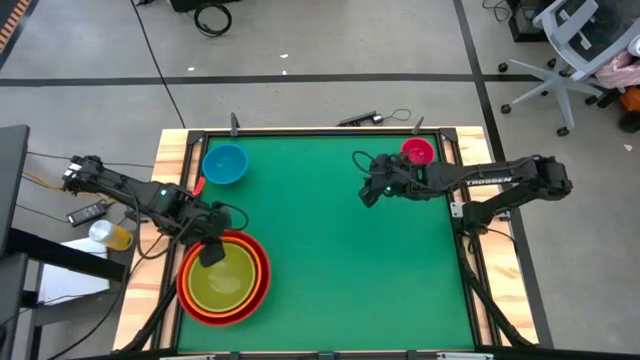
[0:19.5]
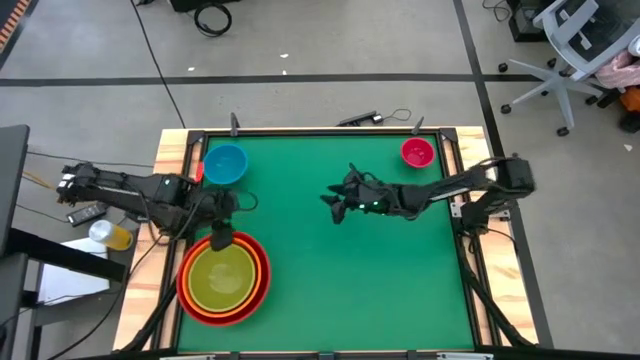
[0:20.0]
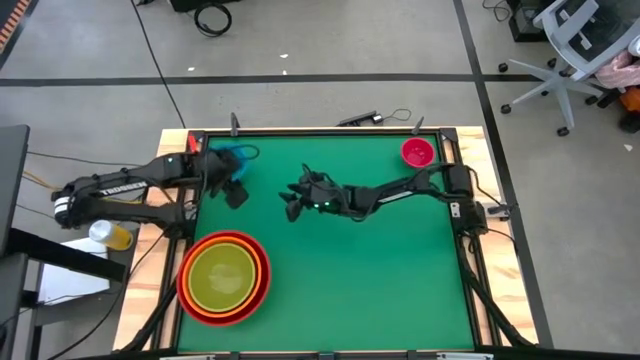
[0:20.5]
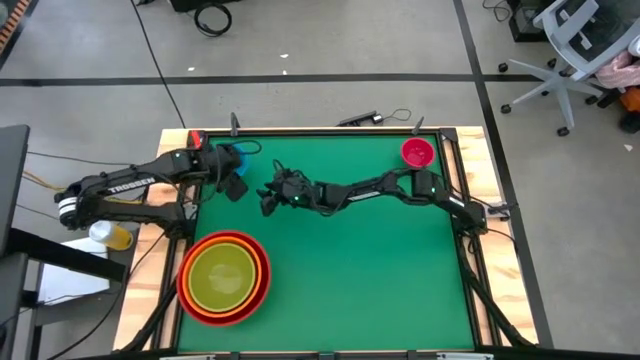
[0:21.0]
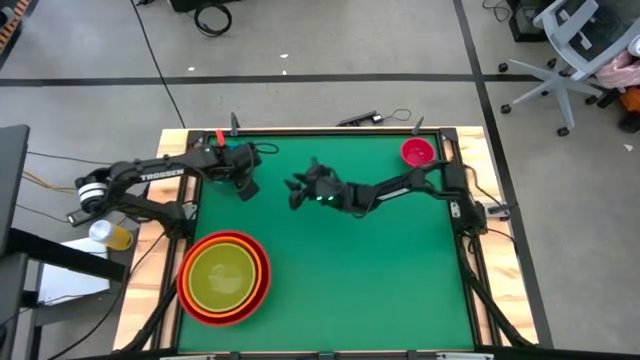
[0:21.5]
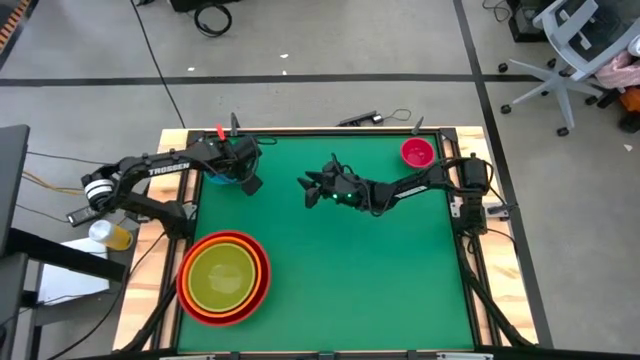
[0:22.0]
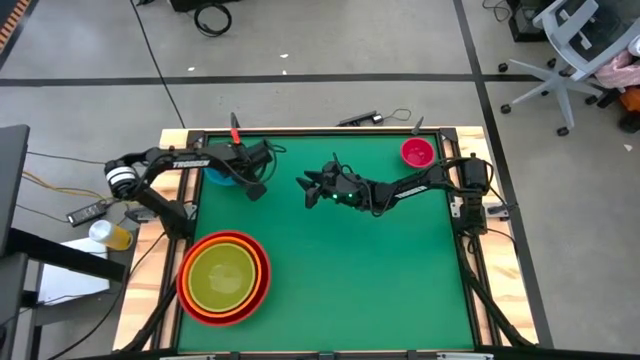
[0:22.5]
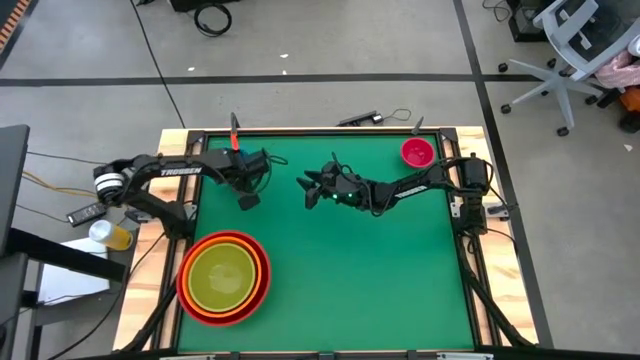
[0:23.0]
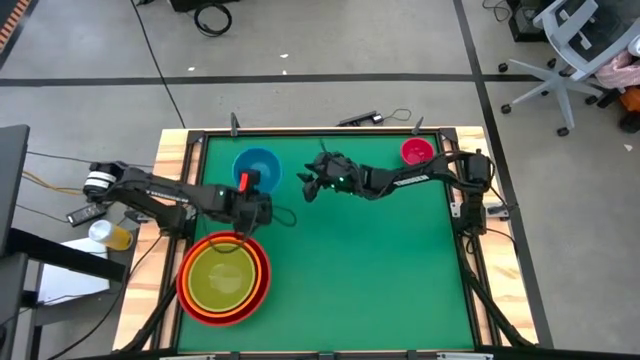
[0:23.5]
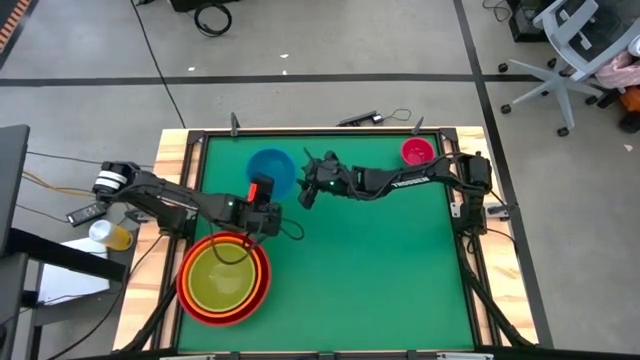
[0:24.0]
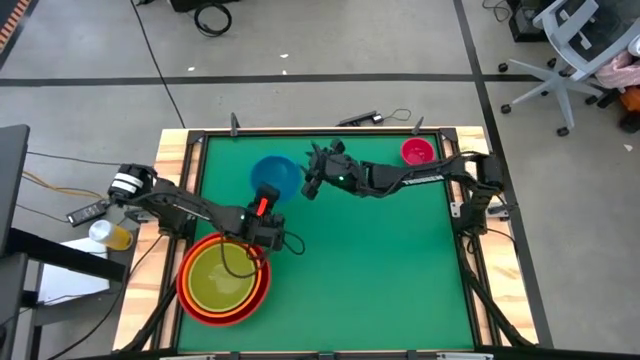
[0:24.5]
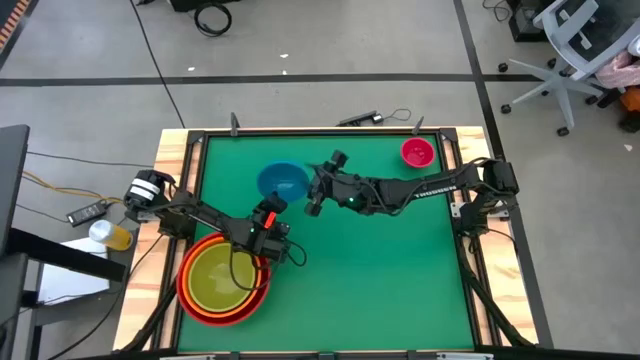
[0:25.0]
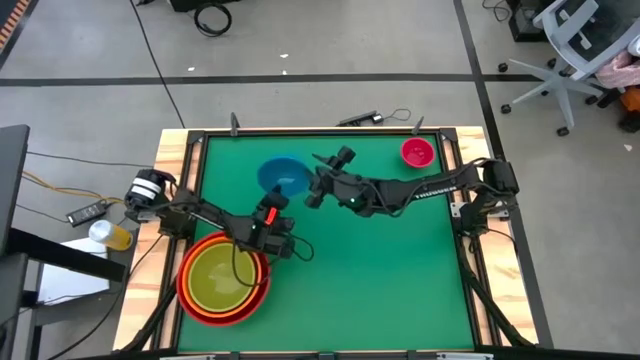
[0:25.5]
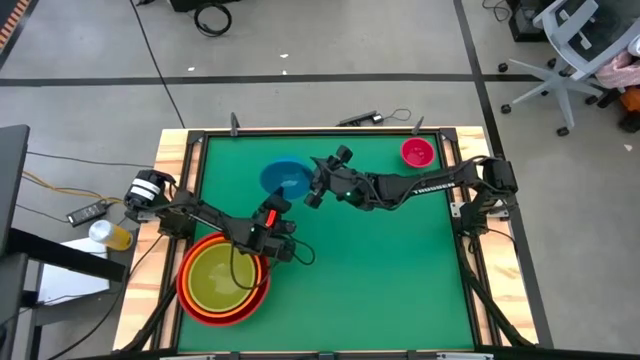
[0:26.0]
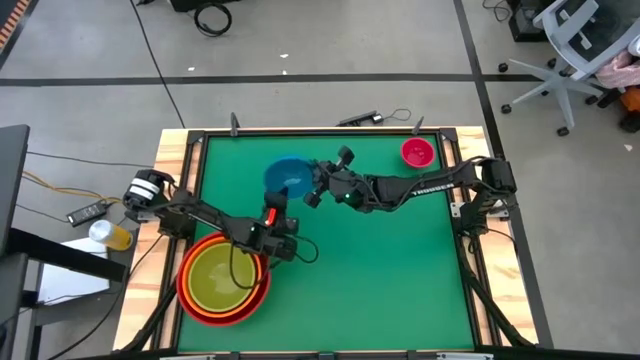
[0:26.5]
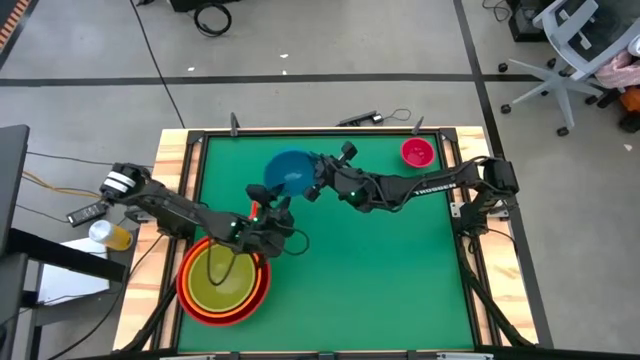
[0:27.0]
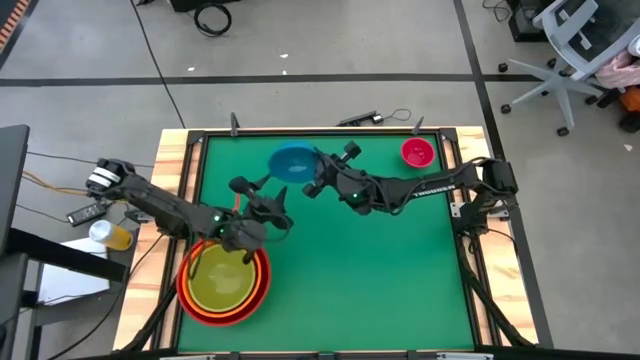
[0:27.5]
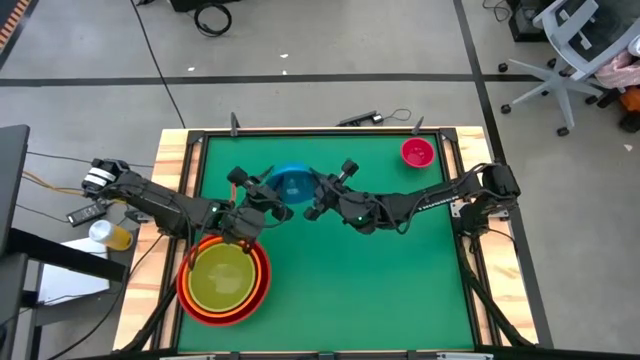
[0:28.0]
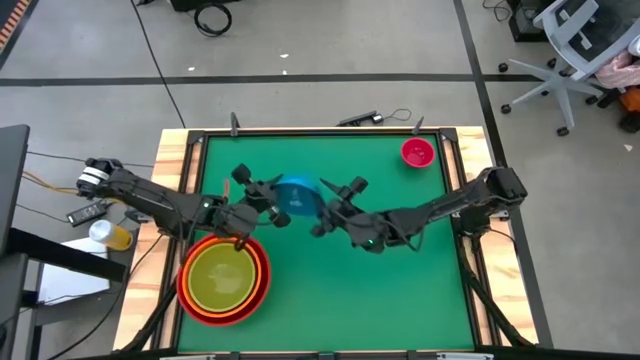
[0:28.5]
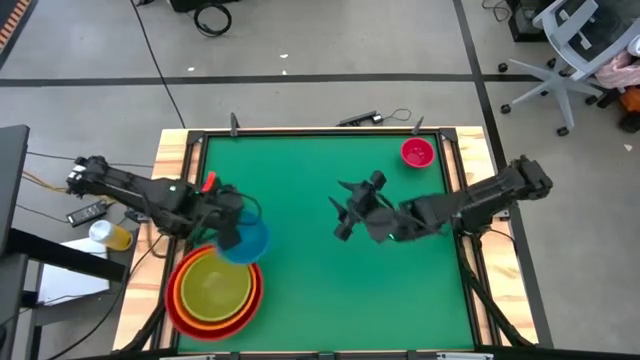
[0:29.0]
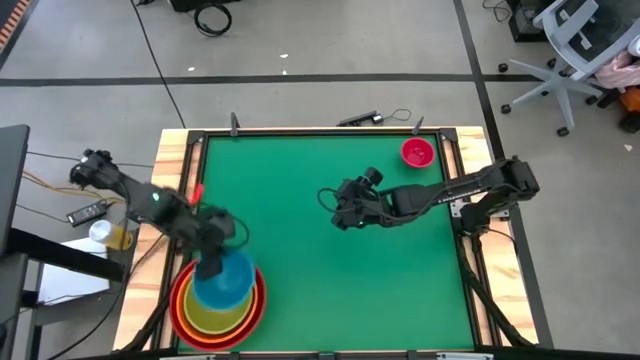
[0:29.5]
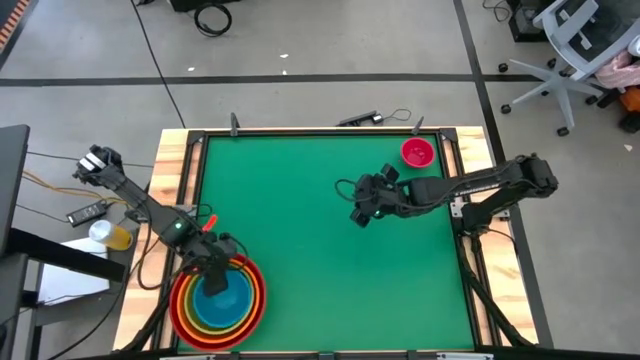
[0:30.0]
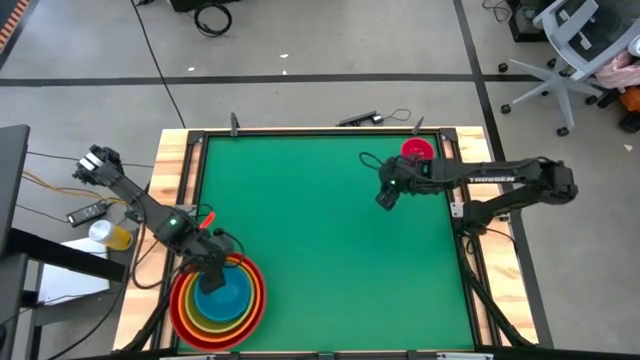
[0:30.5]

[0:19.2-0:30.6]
Stack the blue bowl on top of the green bowl

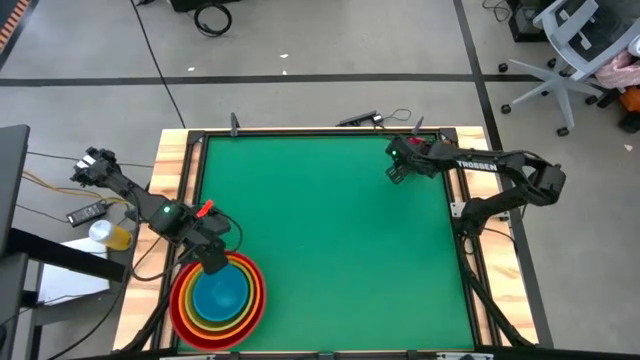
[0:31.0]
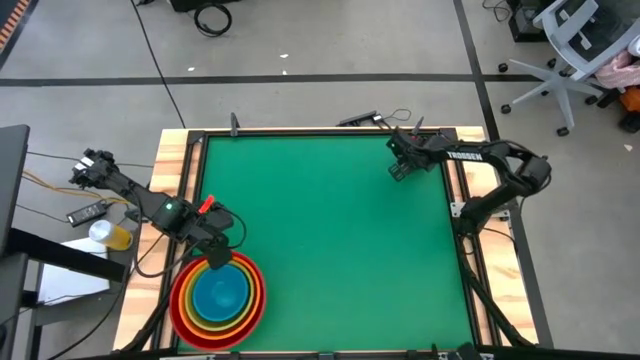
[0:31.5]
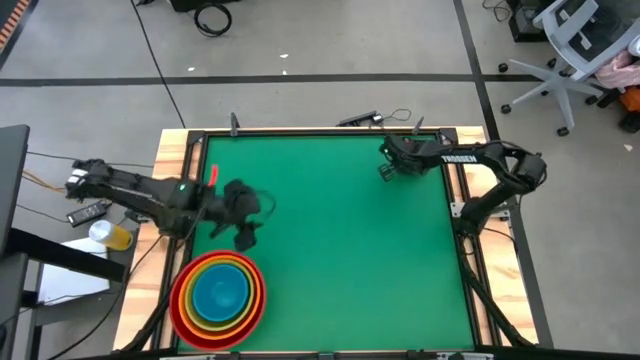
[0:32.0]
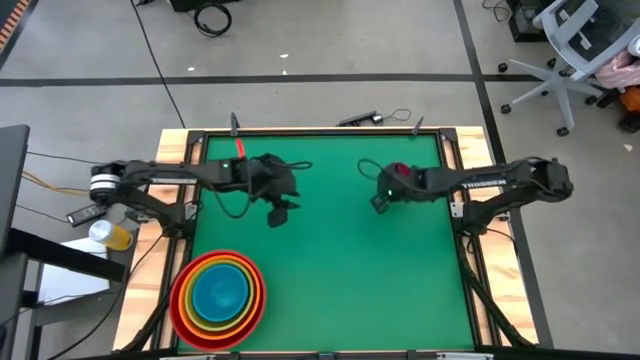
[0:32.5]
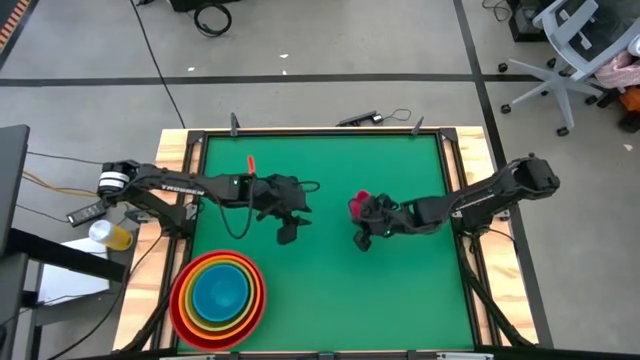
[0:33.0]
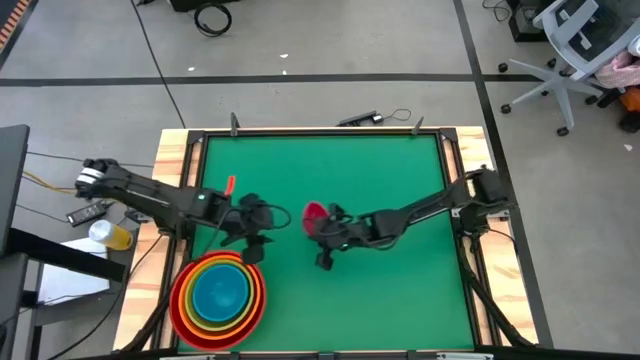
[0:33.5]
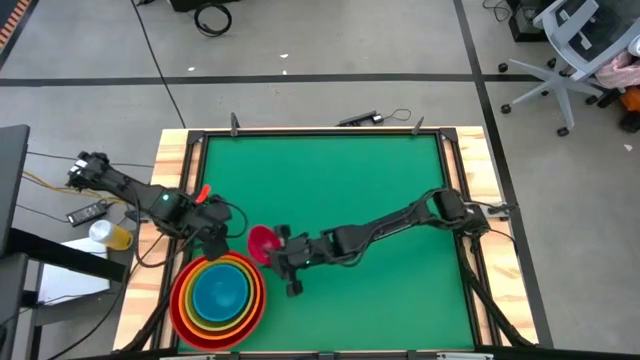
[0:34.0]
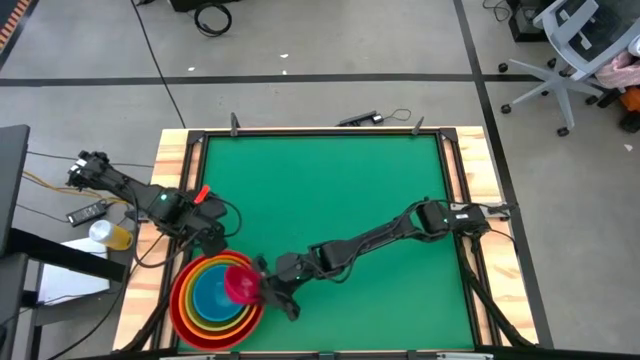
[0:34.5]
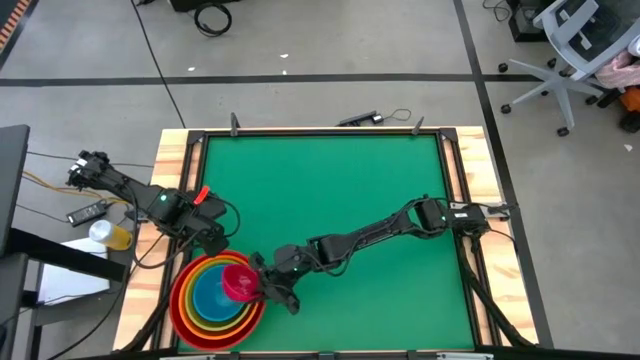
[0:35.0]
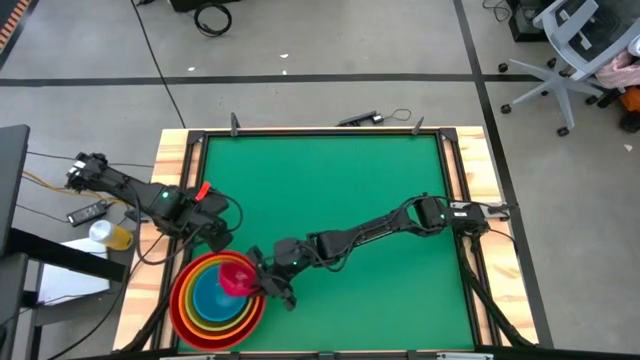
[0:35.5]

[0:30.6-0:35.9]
Stack the pink bowl on top of the blue bowl

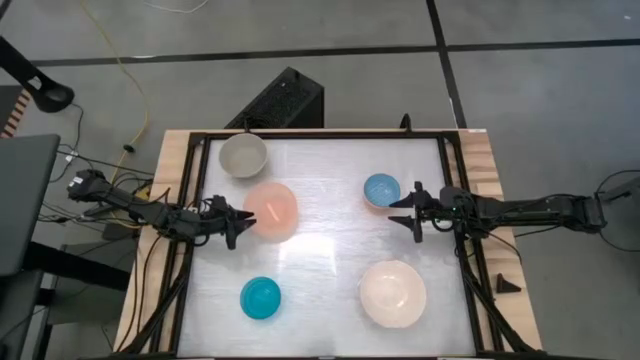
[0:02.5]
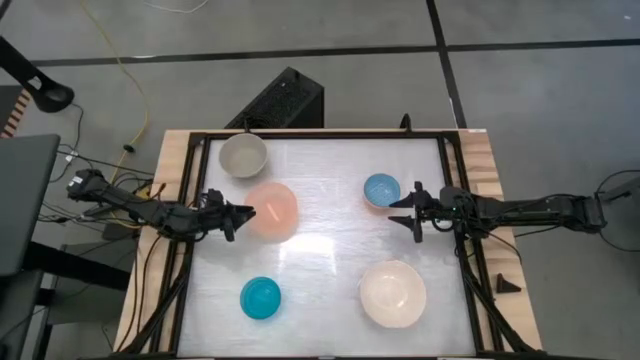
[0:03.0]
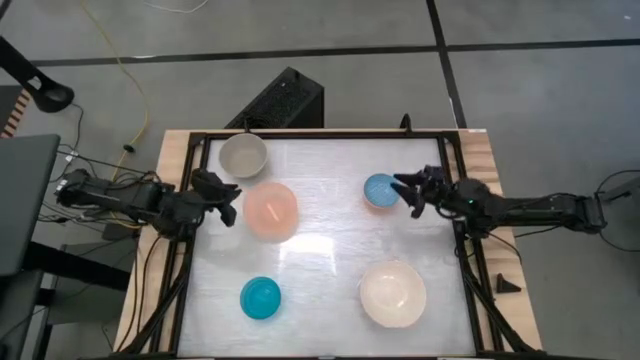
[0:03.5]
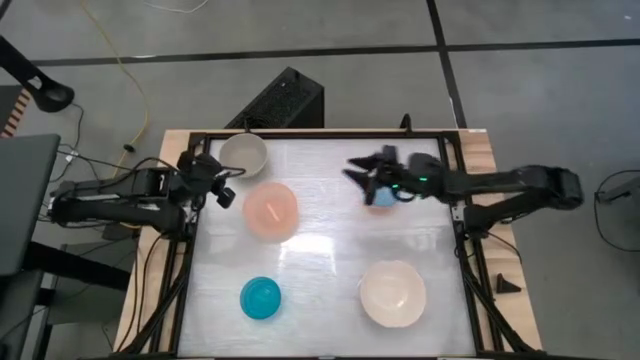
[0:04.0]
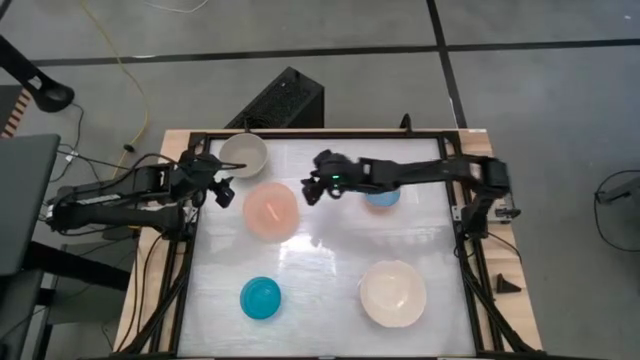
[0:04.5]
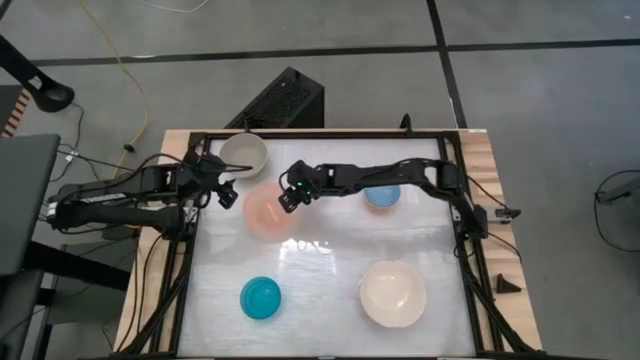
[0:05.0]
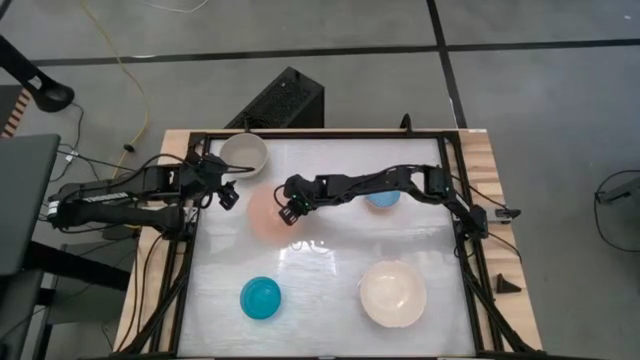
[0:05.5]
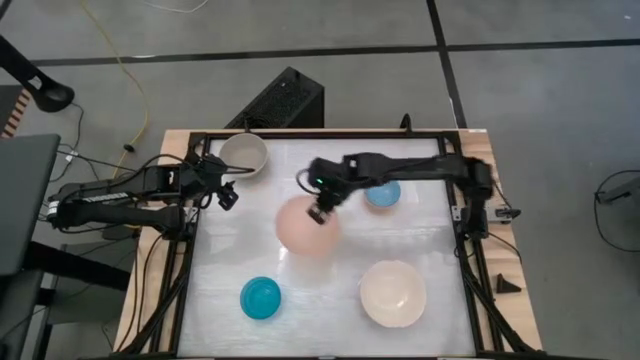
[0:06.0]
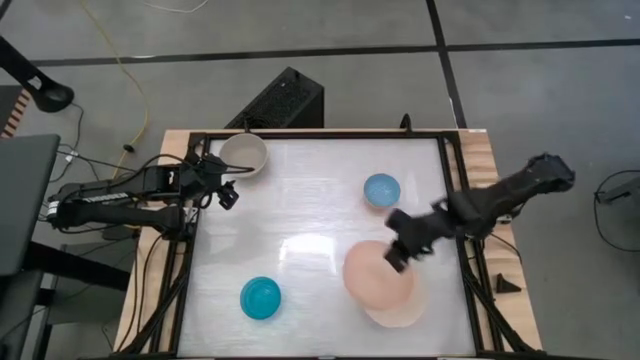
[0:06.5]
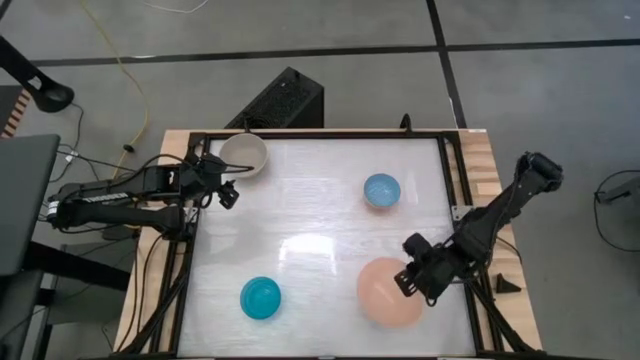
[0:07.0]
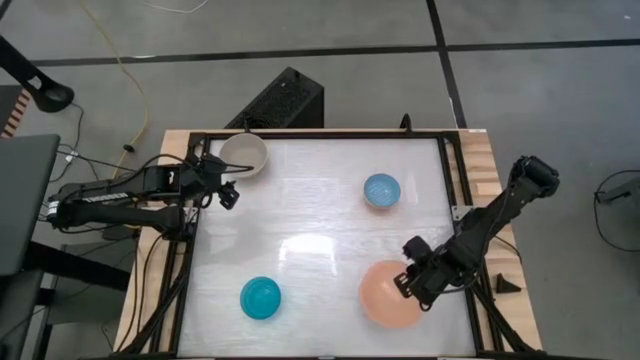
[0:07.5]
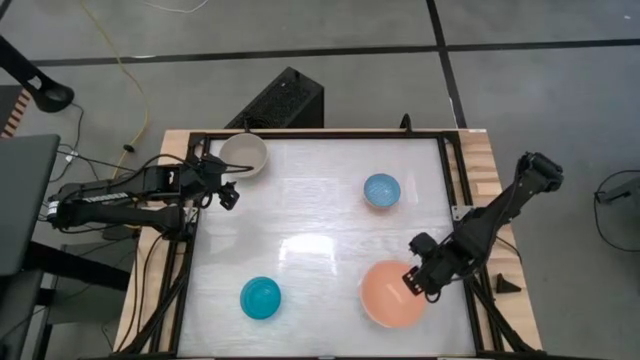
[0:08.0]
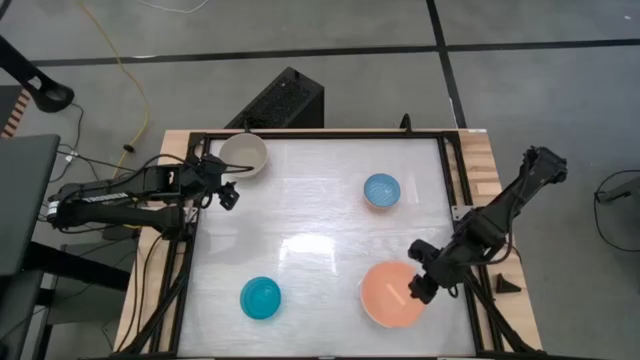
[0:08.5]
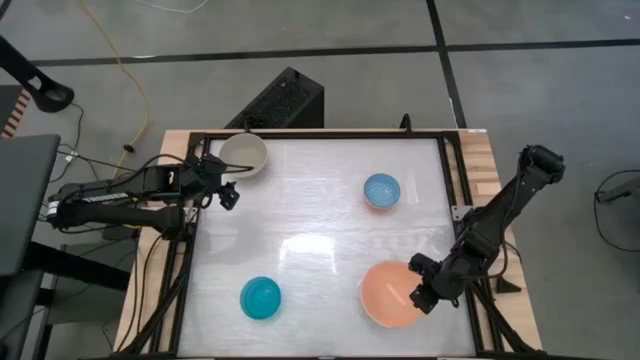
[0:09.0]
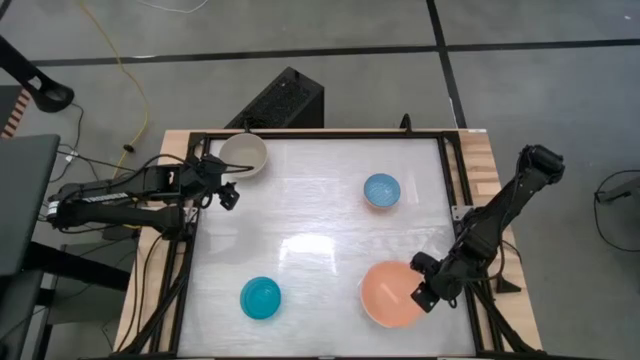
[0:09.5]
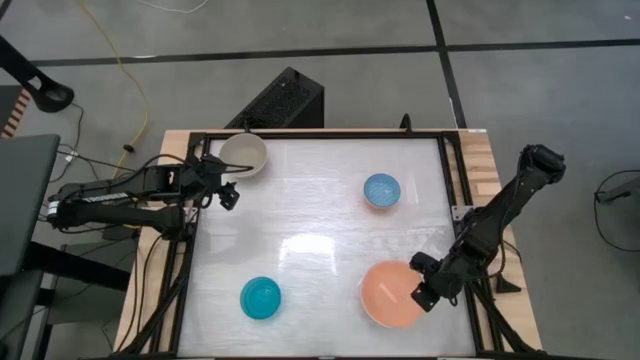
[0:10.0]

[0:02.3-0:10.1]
Stack the light orange bowl on top of the white bowl
